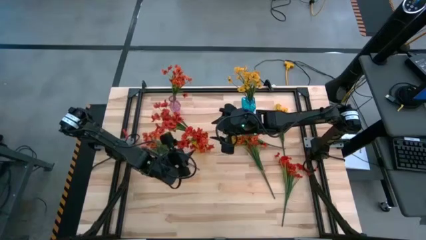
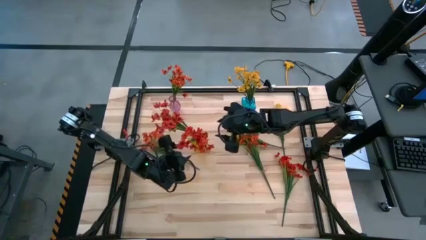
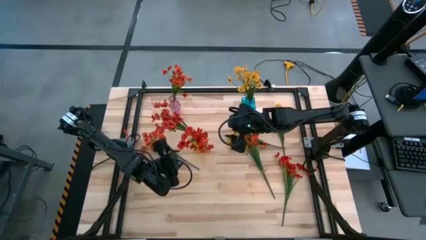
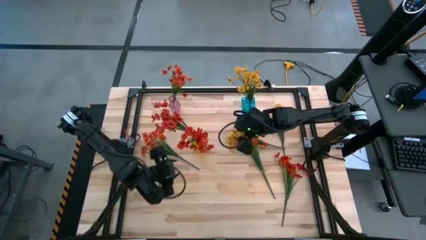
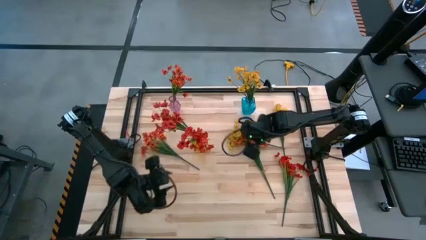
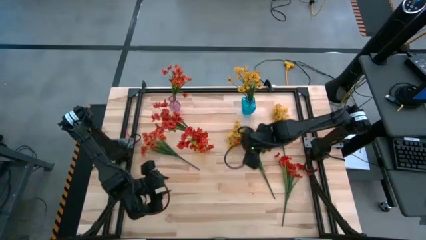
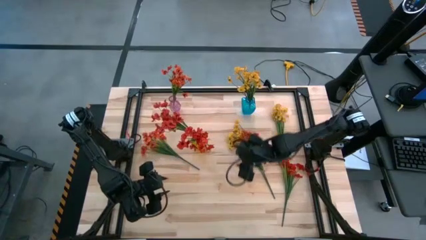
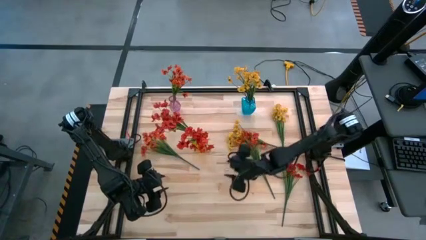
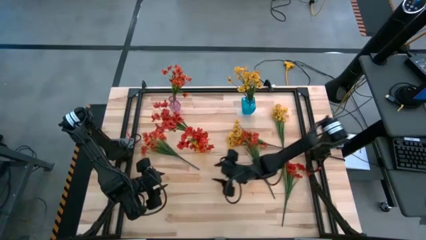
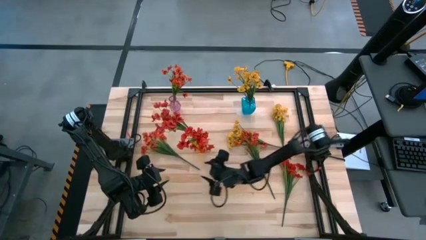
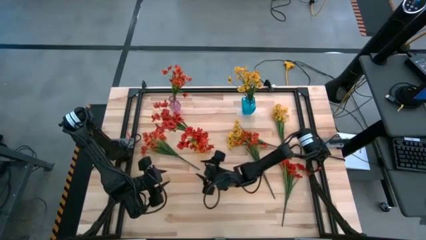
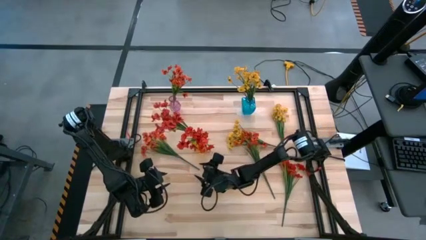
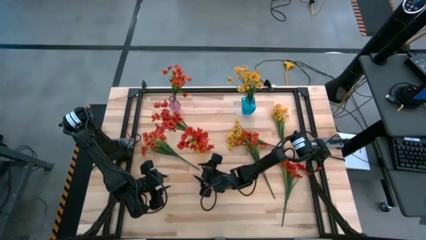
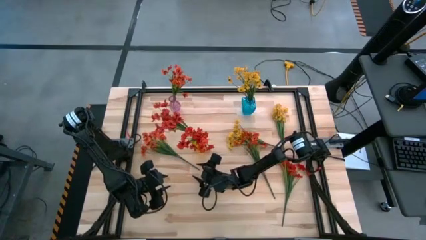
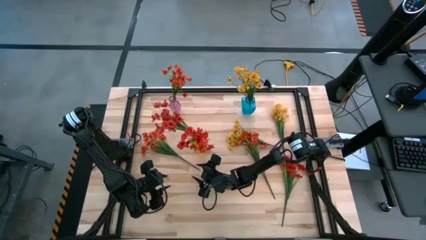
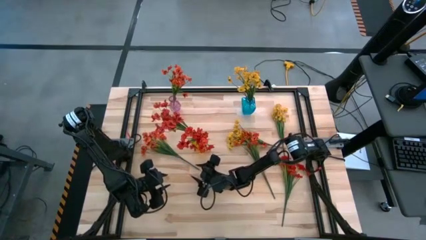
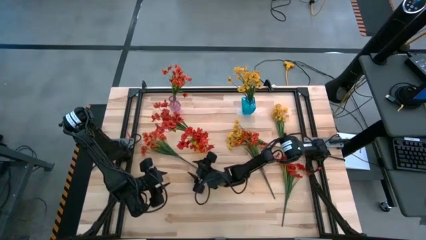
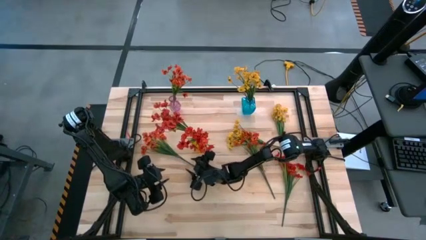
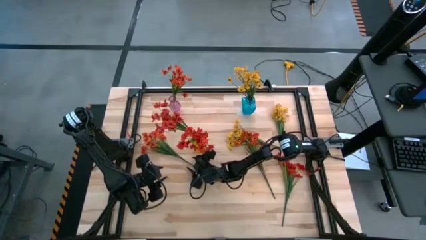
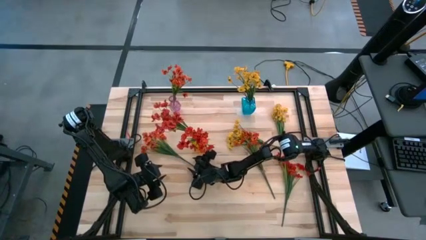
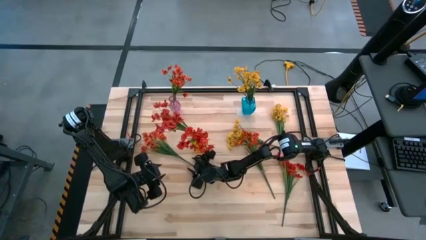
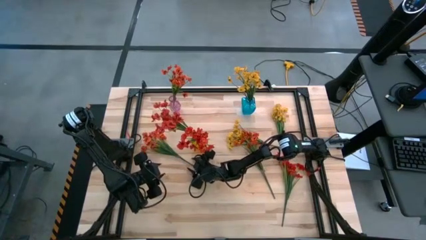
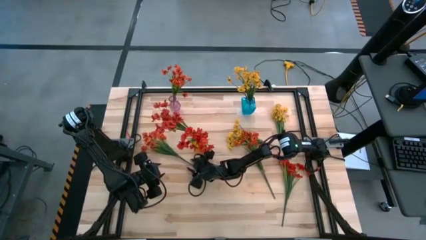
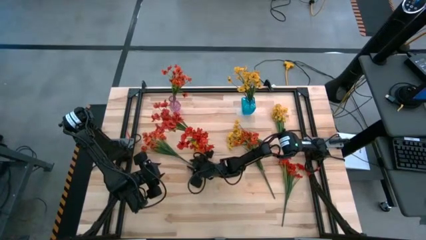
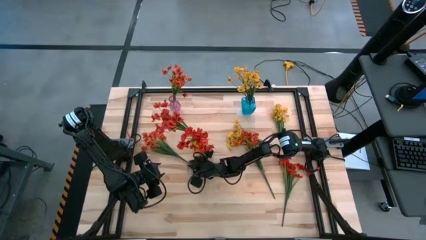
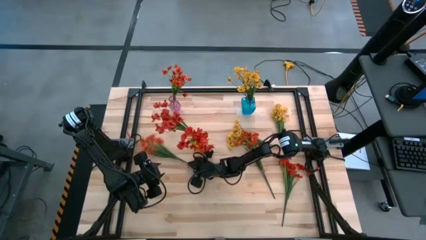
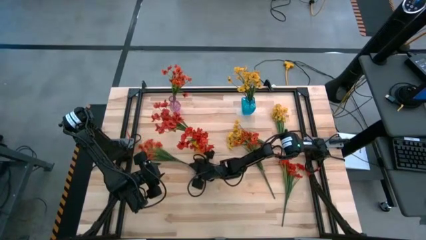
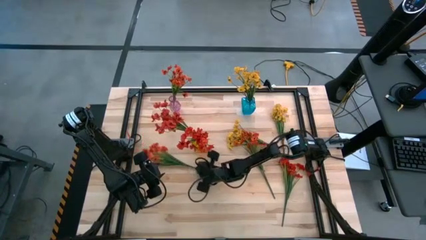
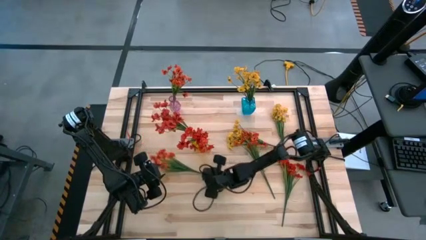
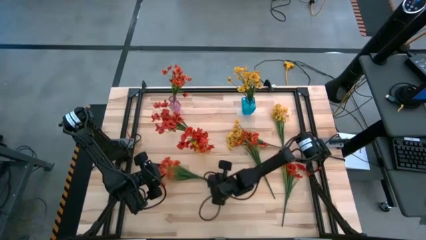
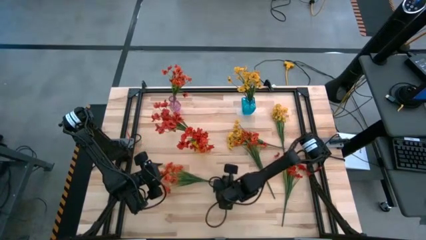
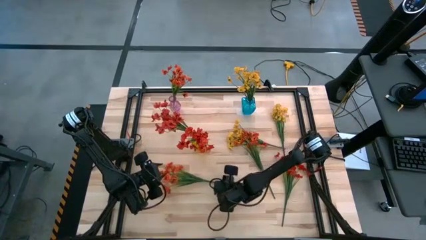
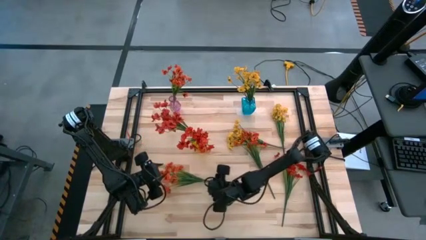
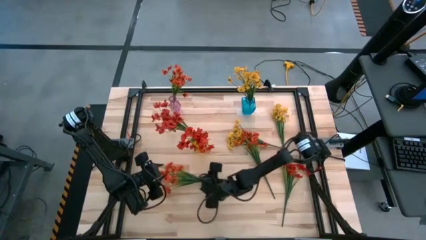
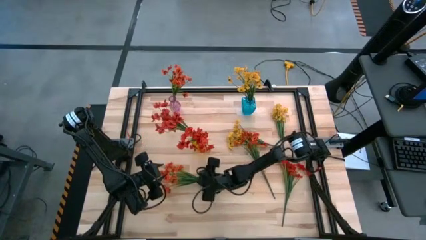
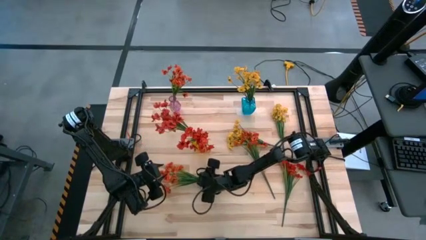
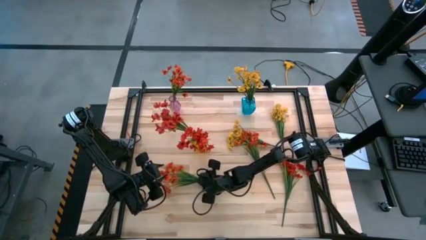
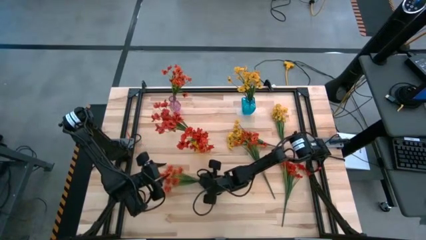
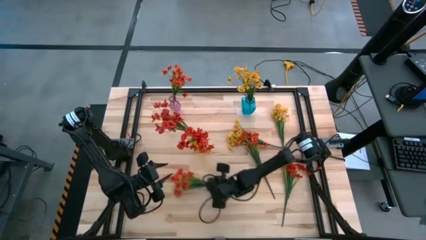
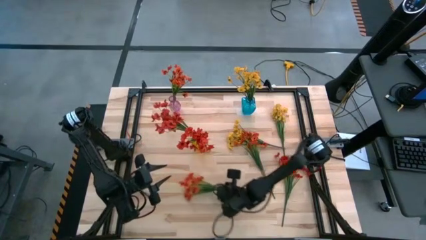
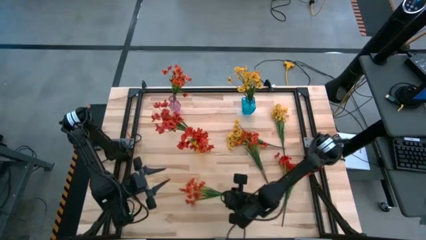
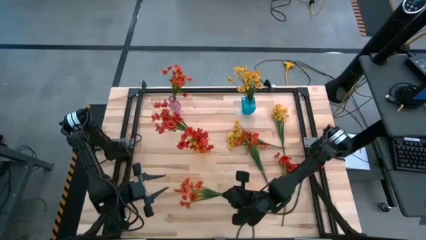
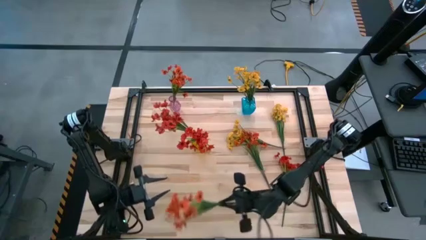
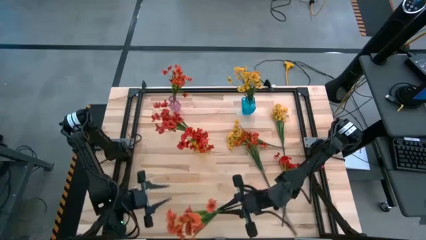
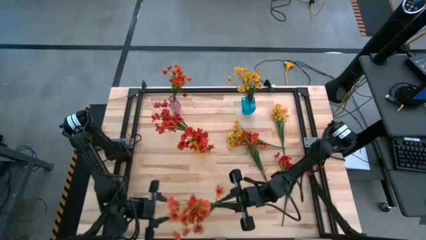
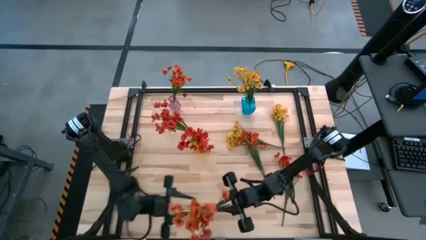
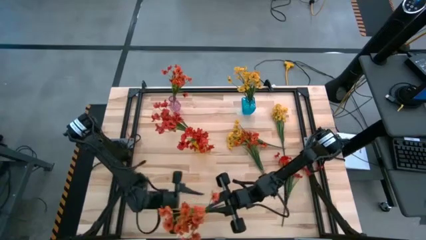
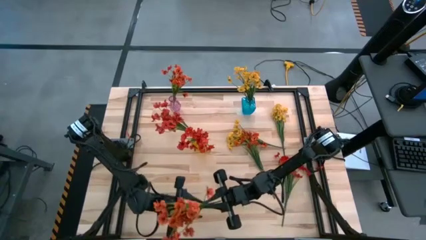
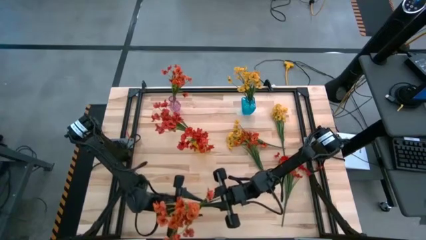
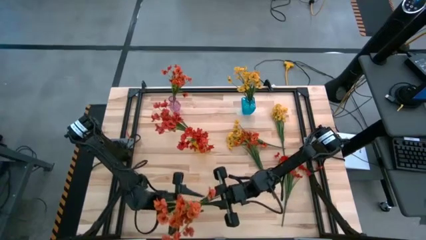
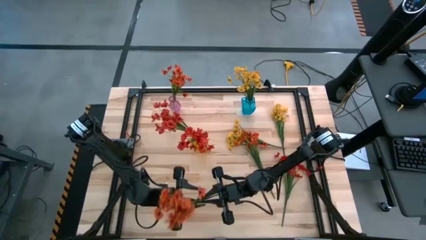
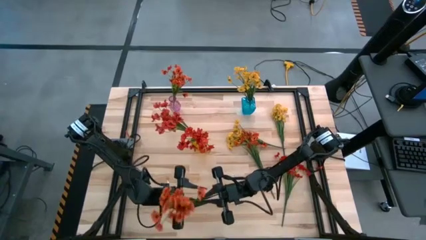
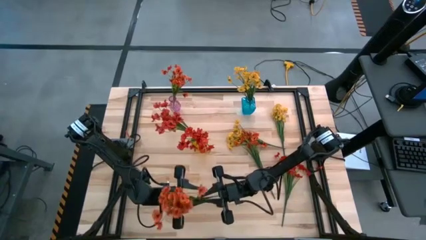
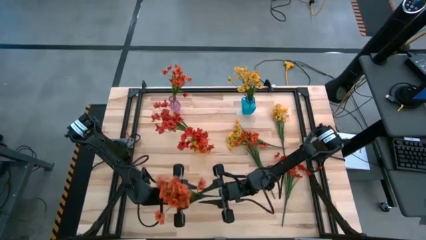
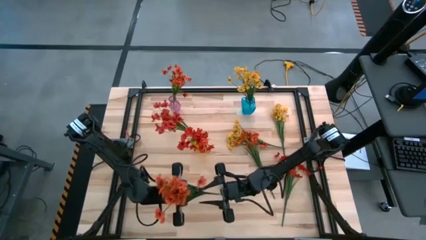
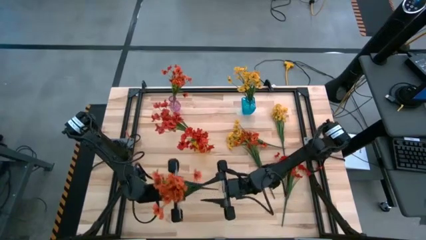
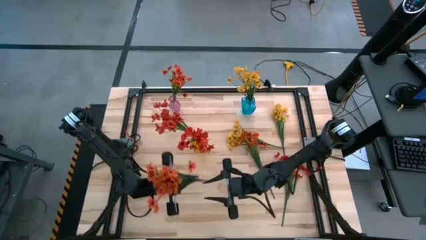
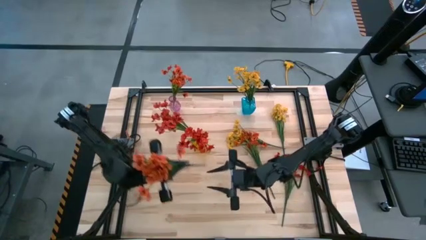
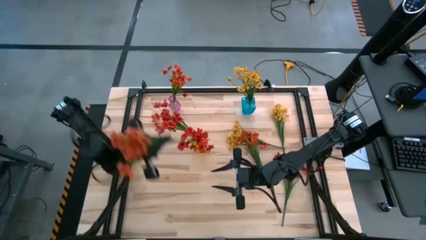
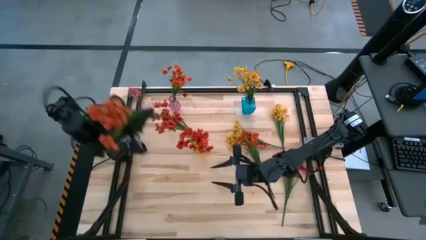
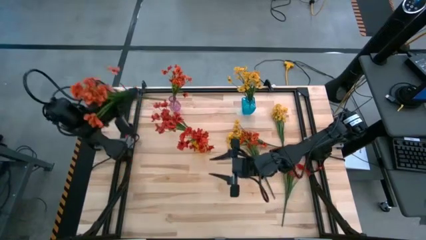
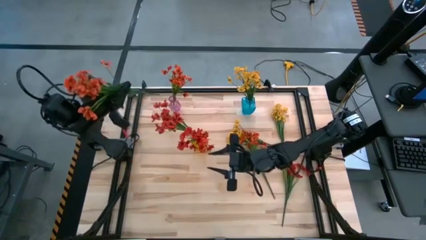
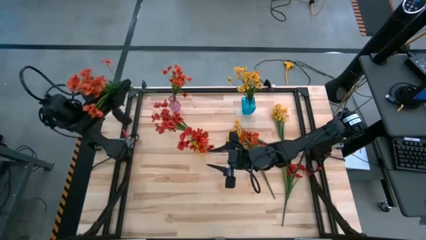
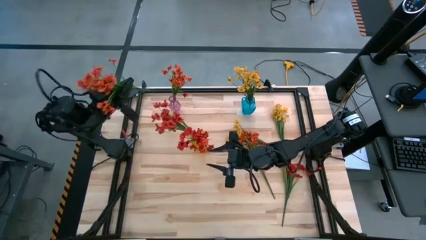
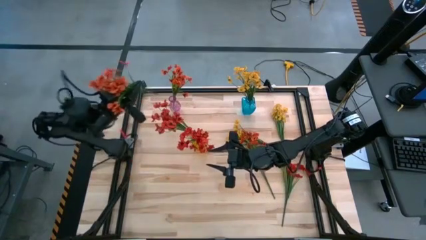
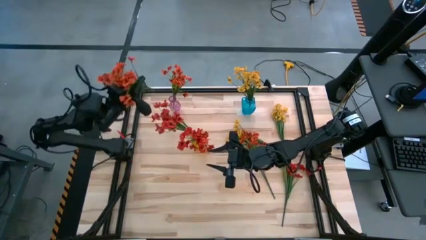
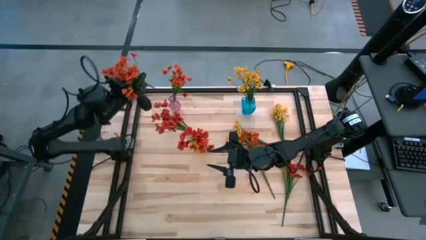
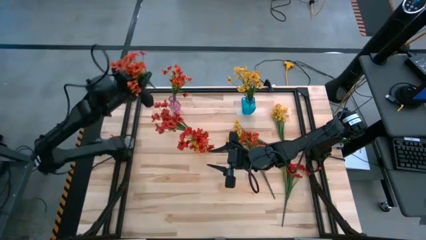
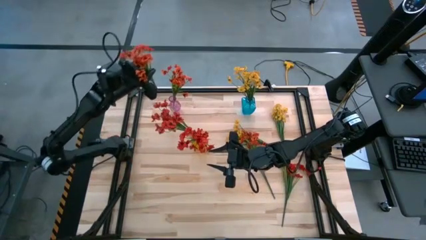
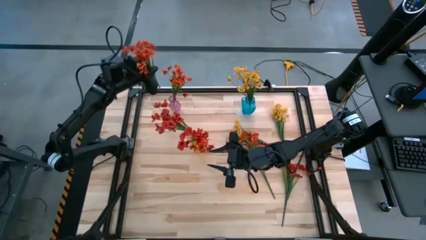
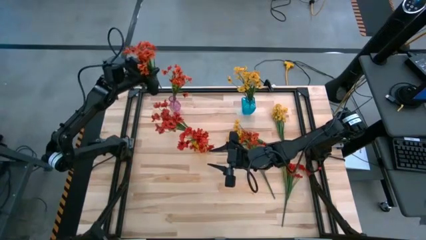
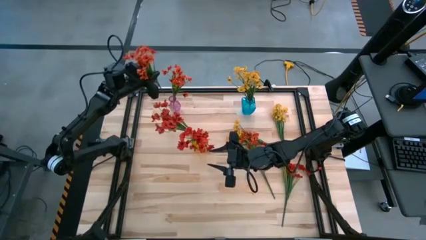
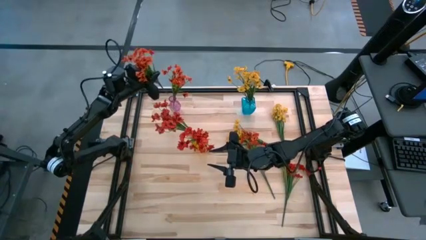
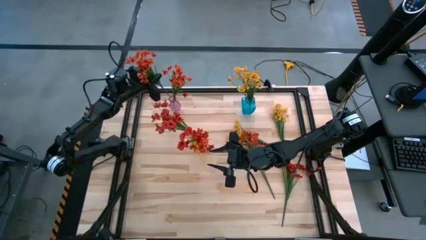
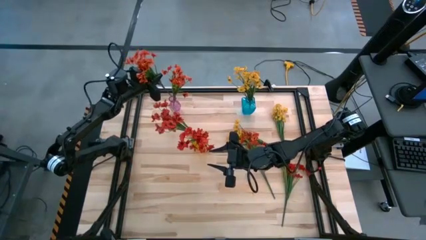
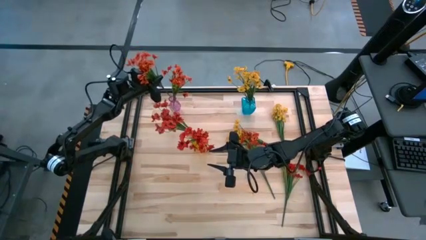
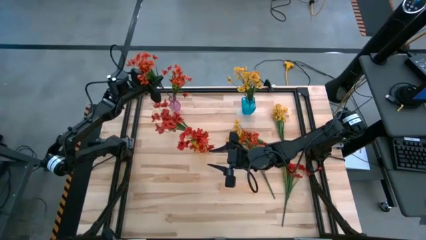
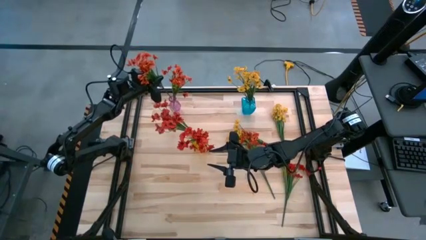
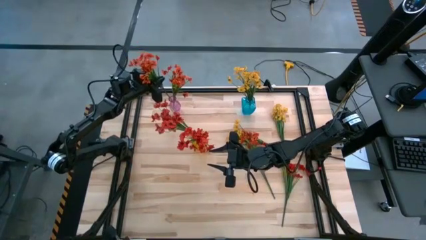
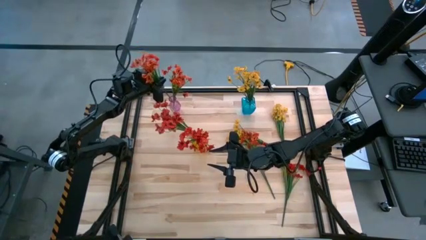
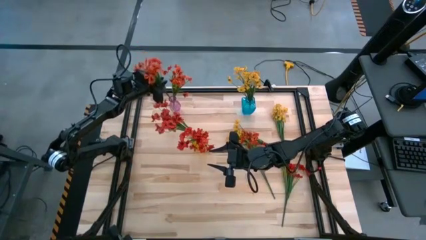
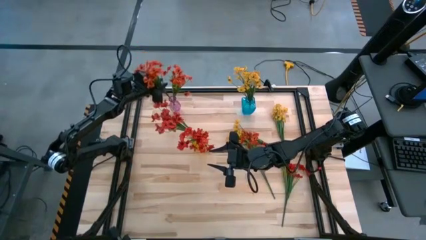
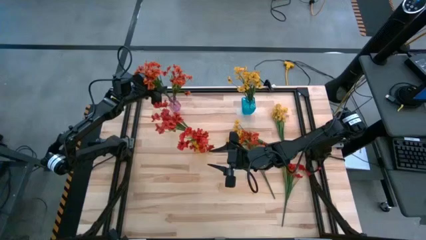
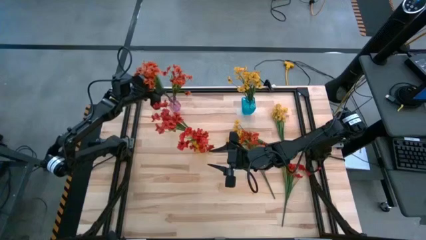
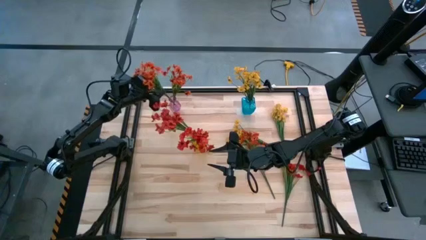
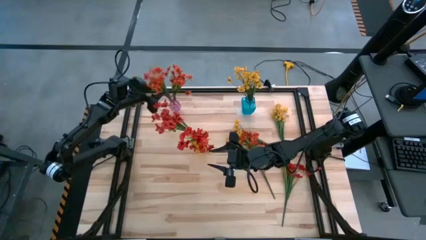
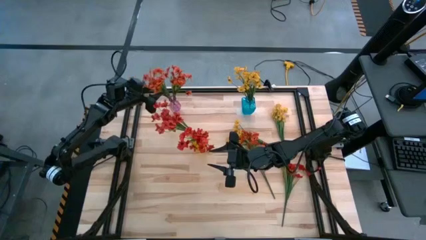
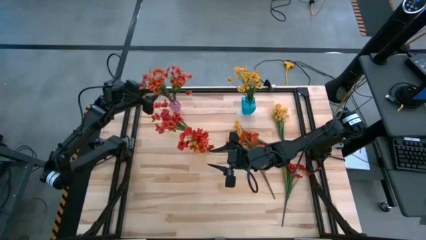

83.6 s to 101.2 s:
Task: Sort flowers into vase by color
Put the left orange flower into the pink vase
